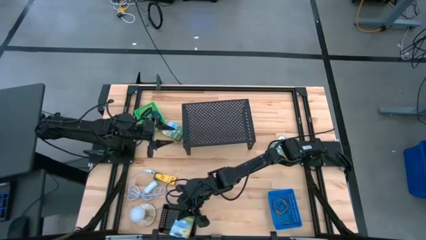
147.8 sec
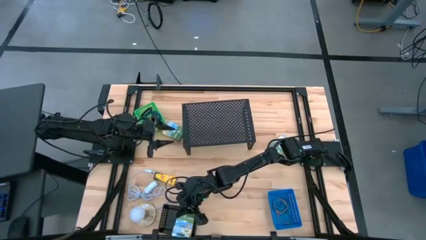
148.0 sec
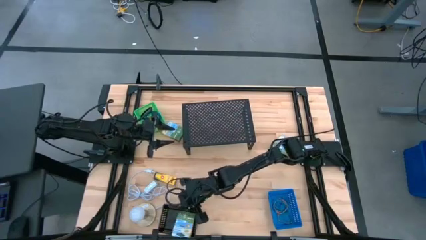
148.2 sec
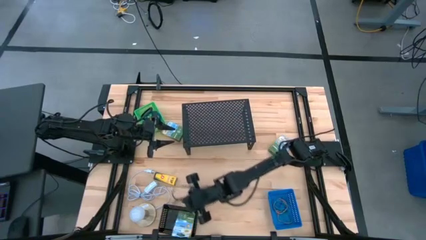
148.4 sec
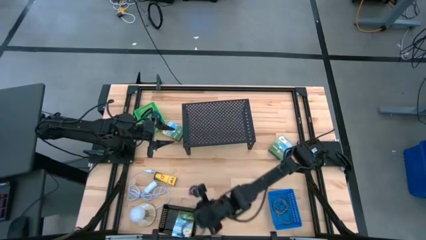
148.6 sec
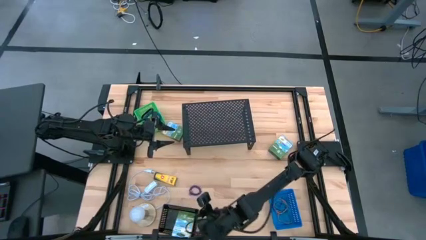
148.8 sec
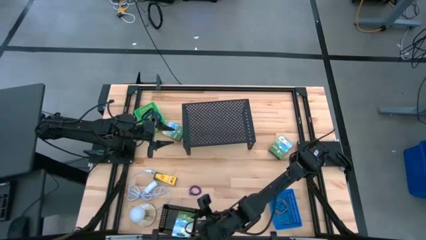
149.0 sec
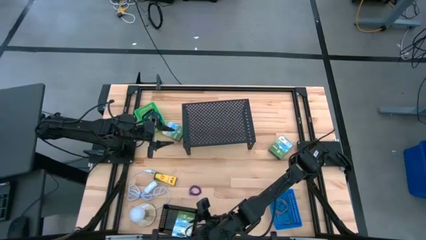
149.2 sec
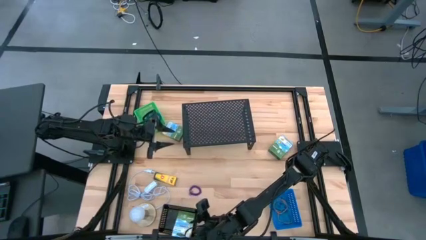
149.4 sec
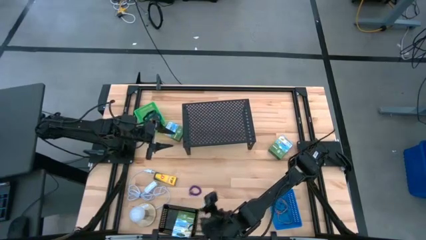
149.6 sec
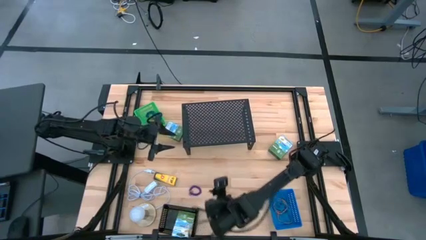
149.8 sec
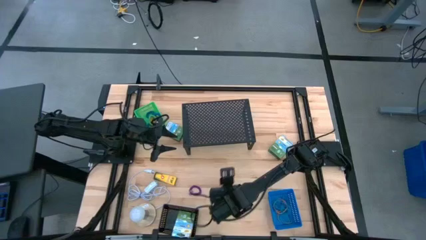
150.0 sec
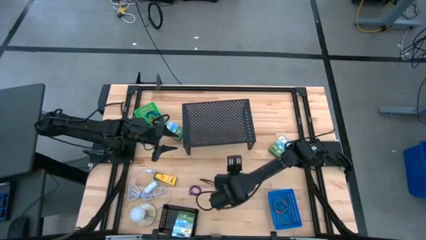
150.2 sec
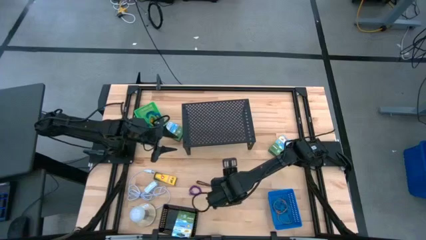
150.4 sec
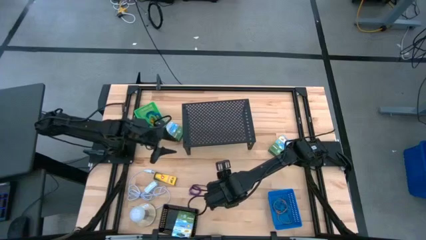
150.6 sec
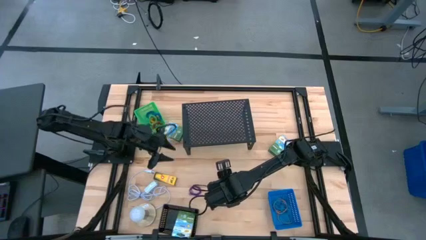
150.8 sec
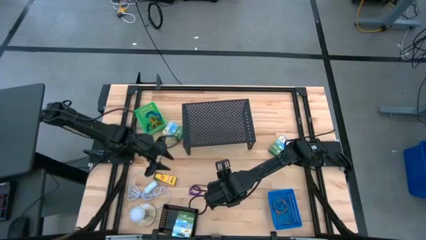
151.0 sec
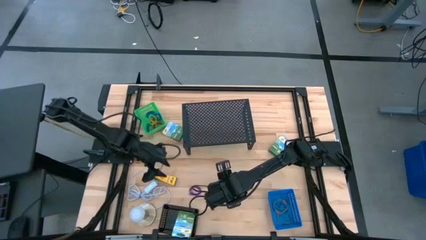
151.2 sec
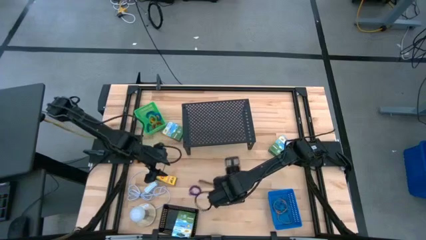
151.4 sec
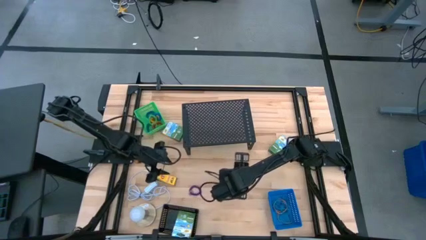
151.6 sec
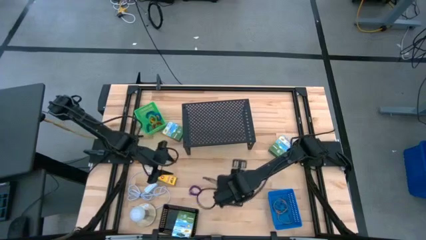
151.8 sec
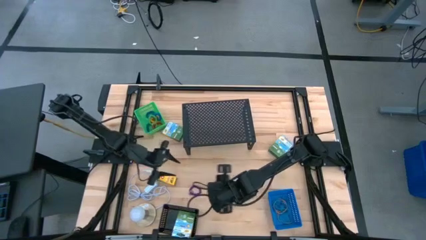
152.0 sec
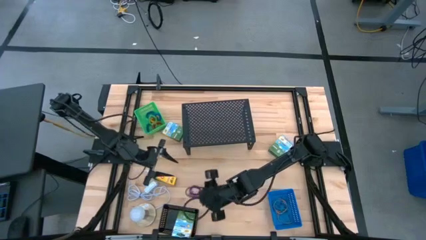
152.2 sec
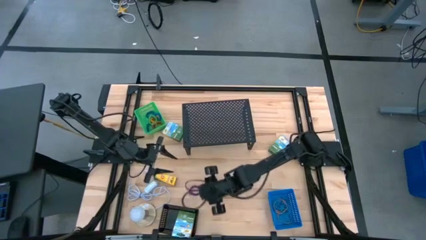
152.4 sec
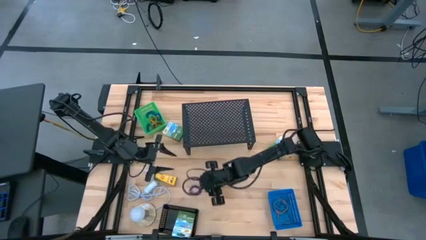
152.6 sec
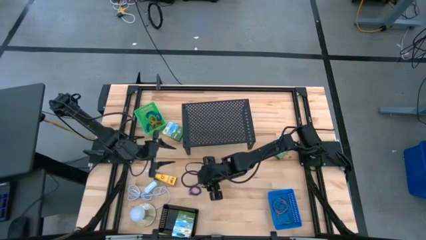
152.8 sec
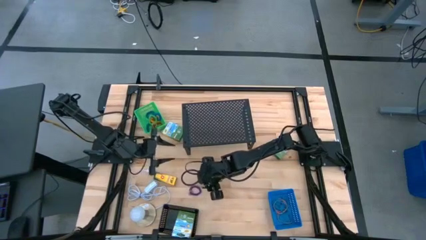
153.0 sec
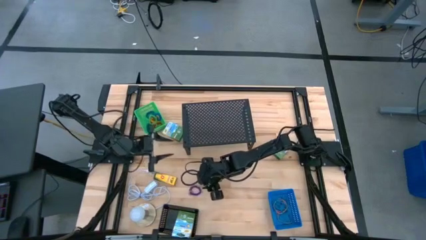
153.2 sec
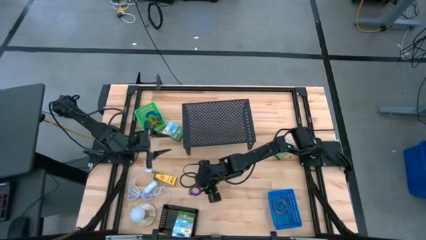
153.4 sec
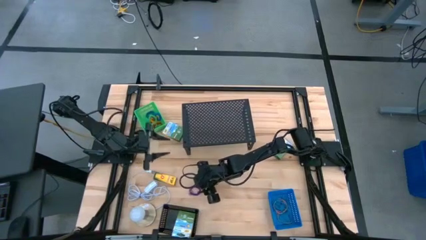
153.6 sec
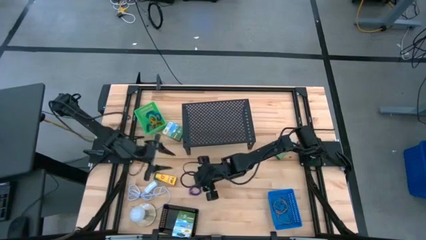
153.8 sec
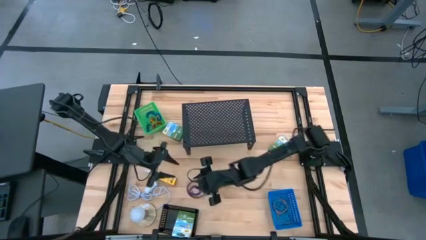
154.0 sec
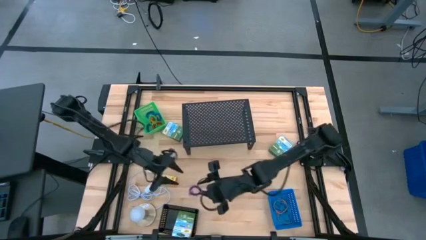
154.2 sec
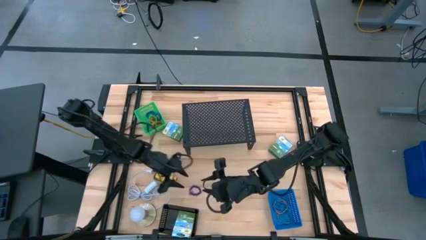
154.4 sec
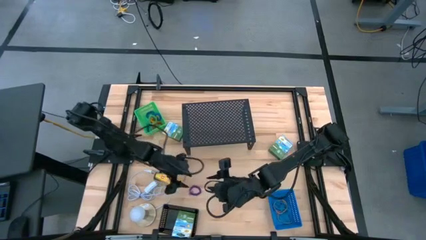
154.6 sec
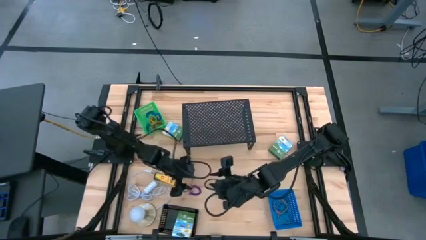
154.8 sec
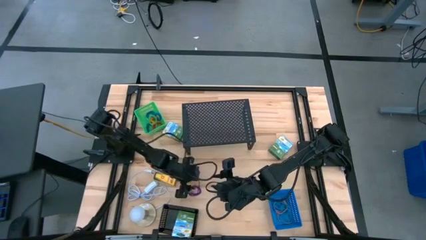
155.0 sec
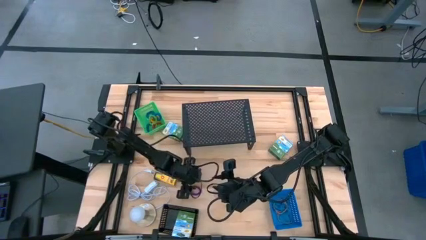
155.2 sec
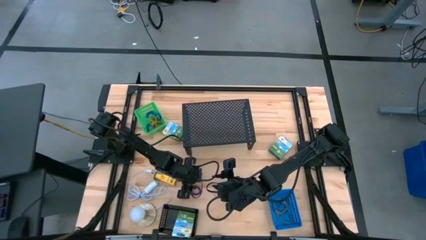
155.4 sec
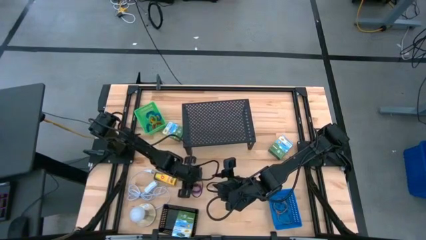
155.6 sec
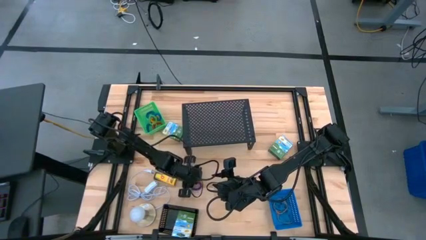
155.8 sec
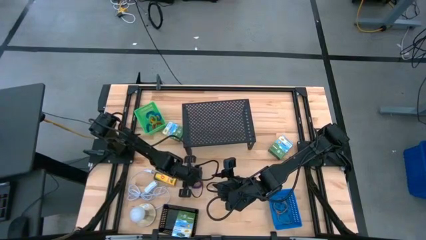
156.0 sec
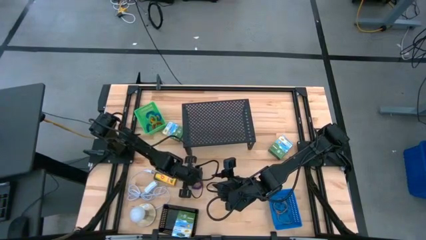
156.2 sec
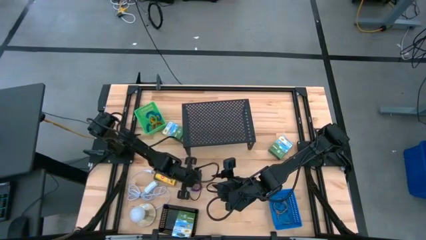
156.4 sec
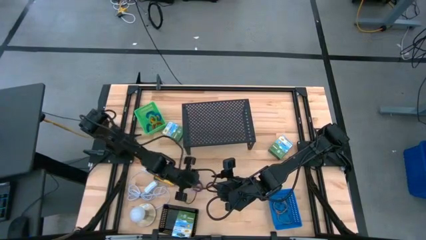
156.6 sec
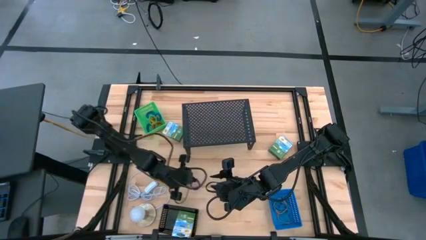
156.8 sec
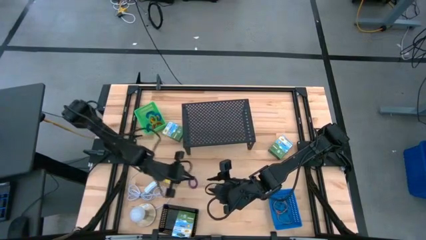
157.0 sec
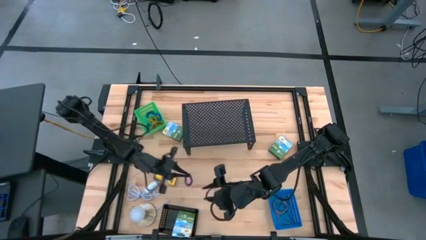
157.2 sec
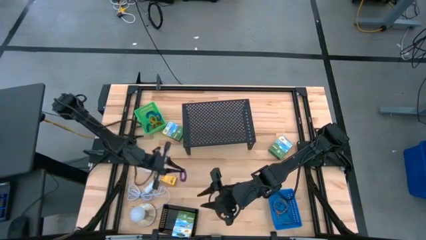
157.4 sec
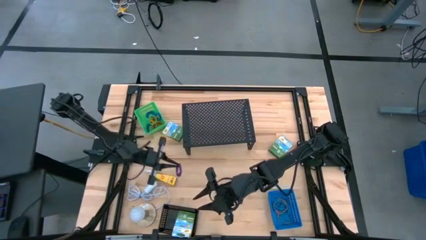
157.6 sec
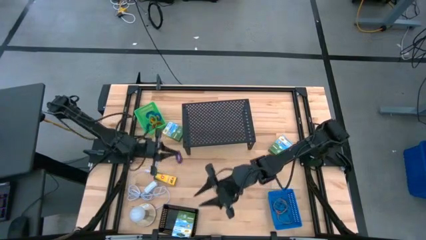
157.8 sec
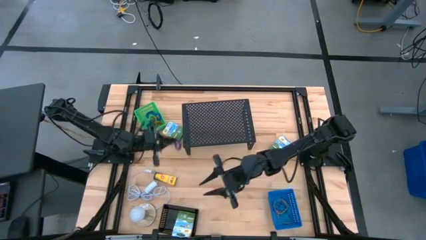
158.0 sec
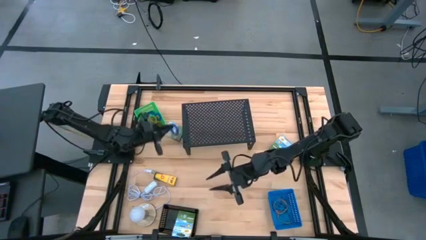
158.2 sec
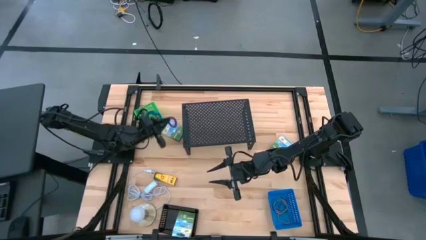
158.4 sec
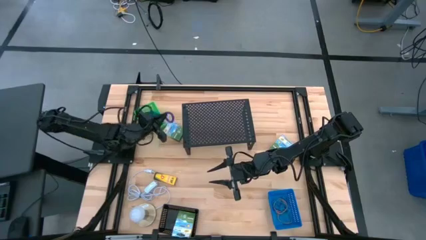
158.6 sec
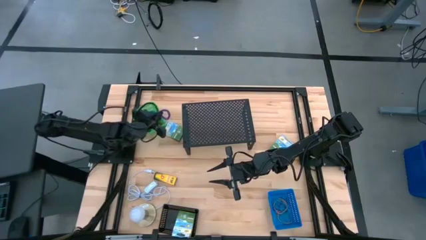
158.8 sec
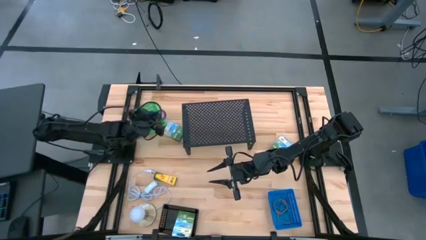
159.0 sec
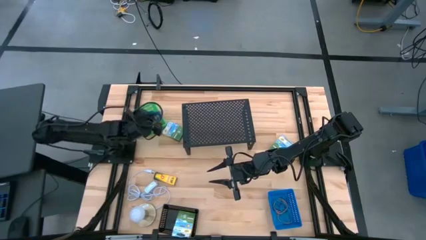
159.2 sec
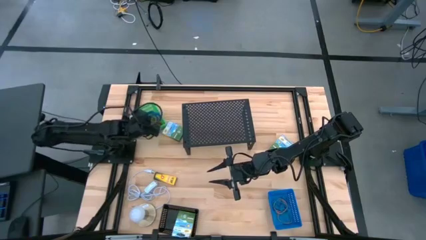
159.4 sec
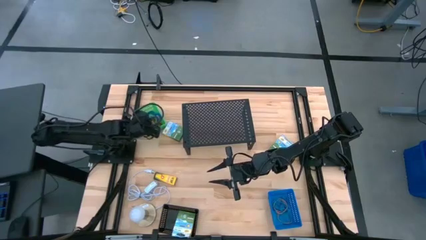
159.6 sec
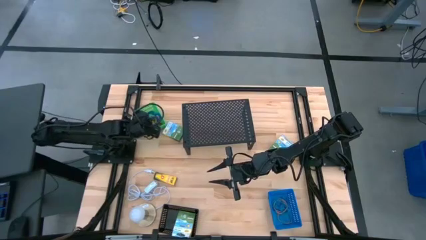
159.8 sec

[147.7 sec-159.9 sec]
Task: Pick & Place Office Desk Supplies
Put the purple spring keychain into the green bin

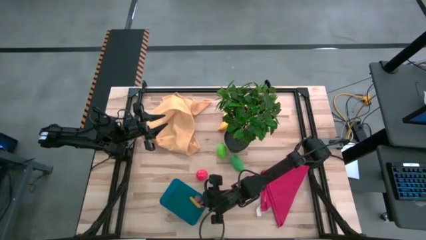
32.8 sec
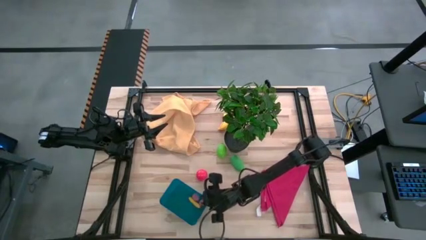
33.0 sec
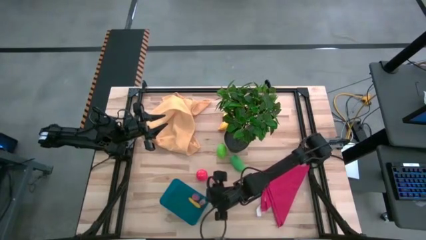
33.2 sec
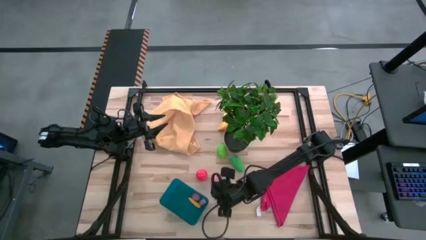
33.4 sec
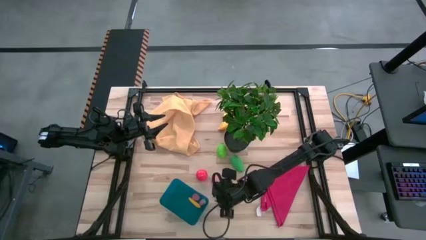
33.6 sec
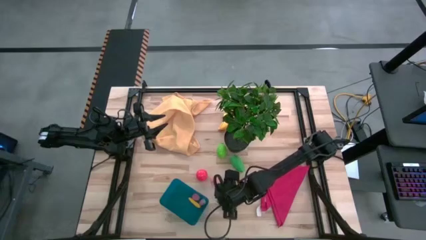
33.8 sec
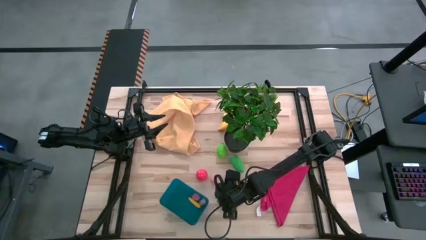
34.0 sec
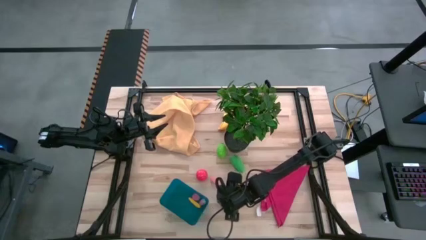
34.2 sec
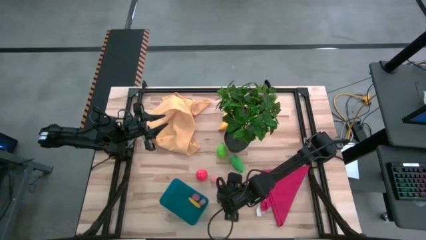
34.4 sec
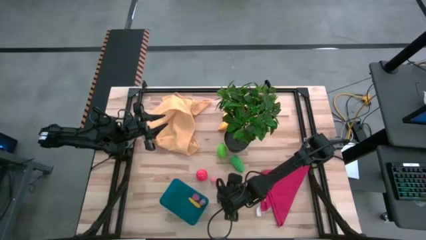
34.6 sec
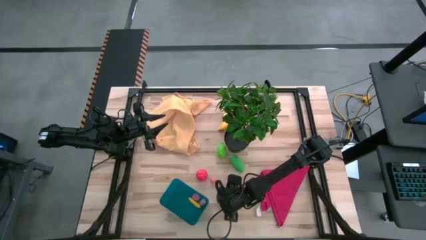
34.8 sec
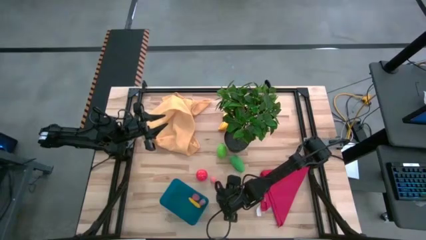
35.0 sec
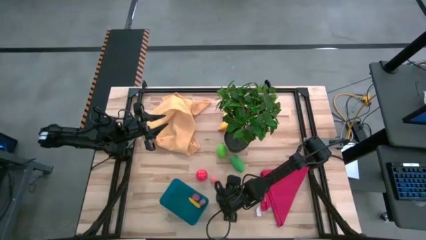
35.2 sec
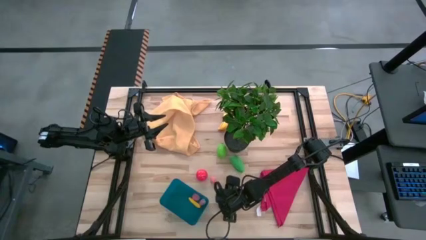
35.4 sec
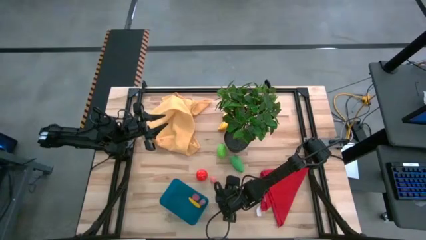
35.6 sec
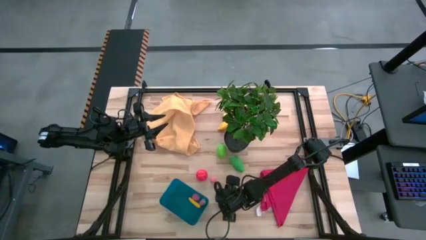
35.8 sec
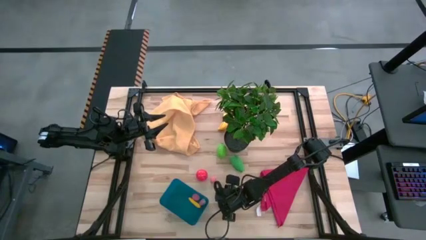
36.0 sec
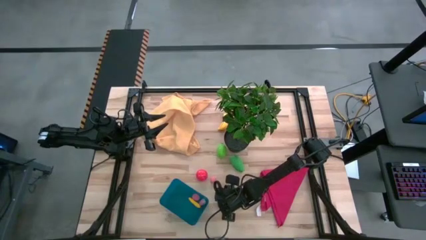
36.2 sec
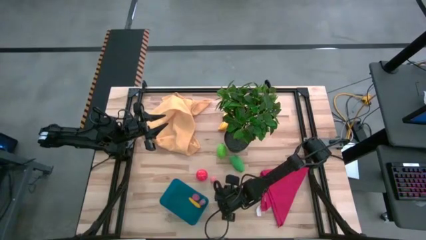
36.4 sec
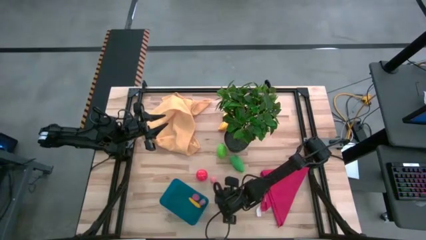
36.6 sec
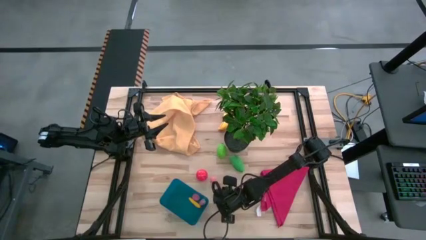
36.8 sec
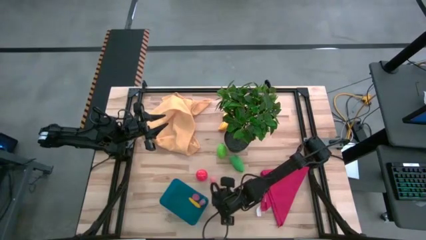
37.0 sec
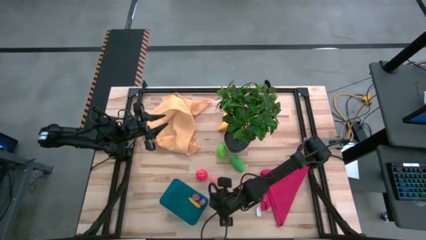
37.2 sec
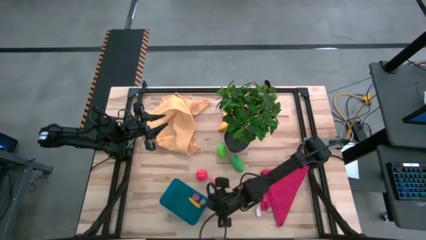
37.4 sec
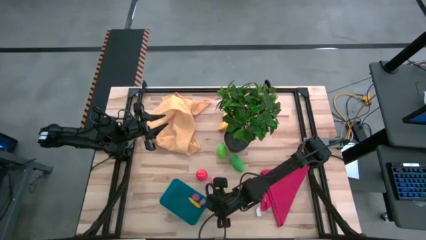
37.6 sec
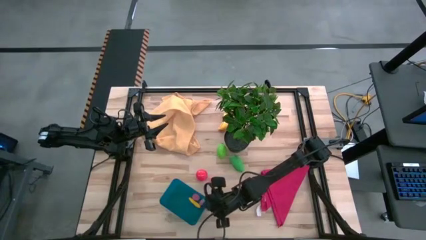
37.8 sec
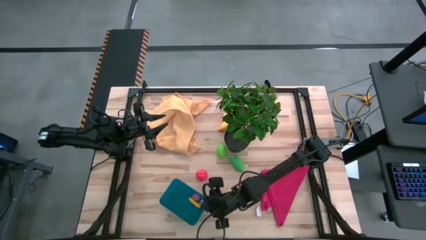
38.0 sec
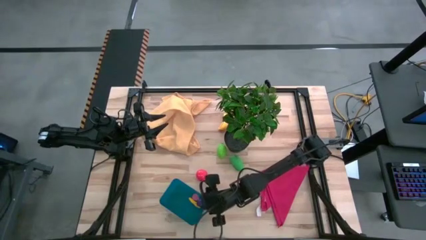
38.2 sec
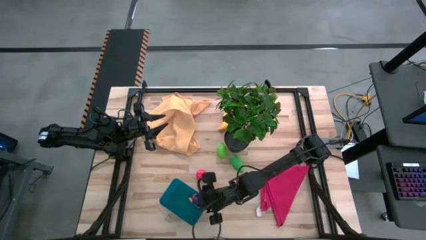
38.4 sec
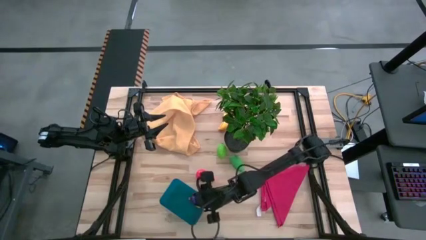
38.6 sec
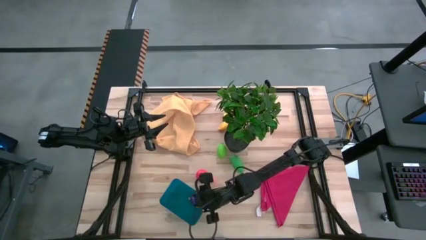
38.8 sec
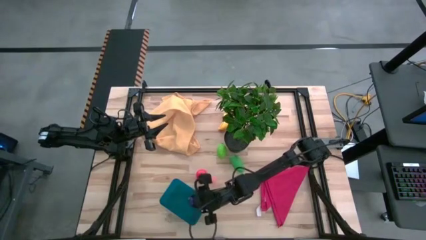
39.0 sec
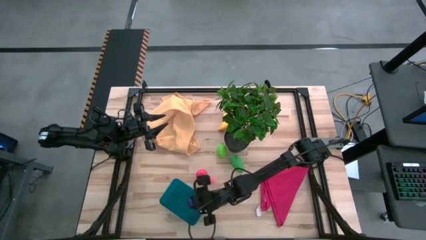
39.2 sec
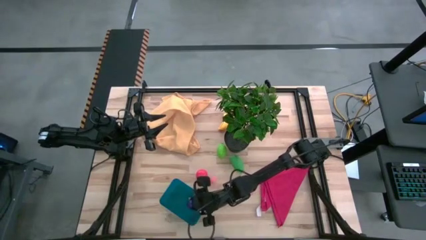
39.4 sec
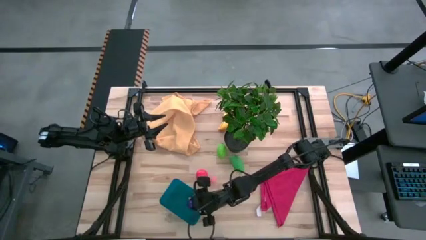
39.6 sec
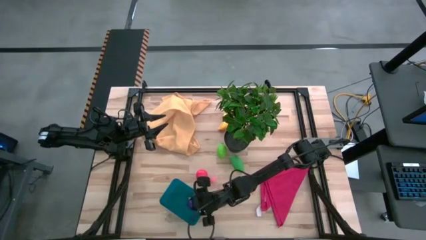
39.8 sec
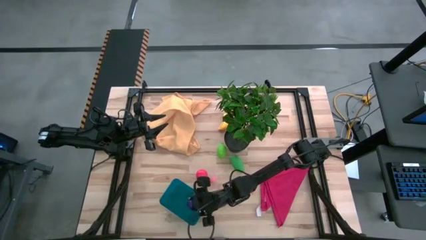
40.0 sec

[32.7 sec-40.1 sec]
Task: Pick and placing Produce into tupperware
Put the violet eggplant into the blue bin
